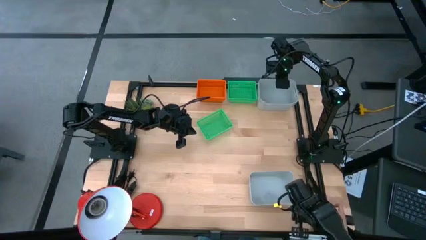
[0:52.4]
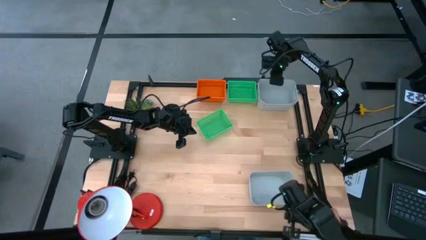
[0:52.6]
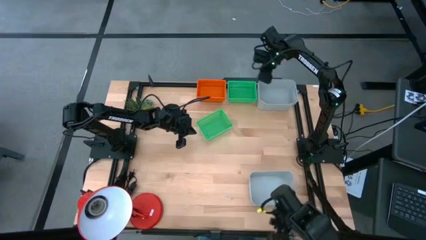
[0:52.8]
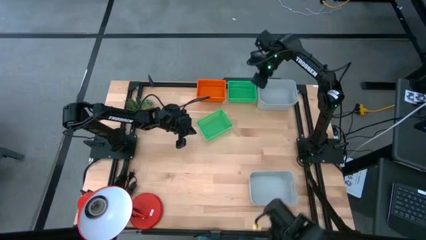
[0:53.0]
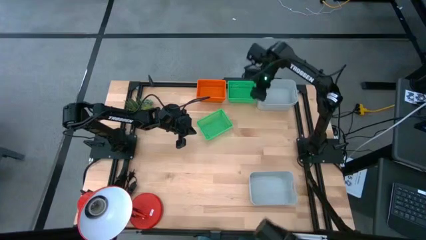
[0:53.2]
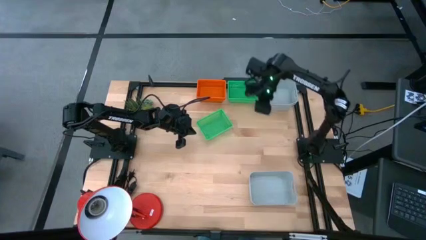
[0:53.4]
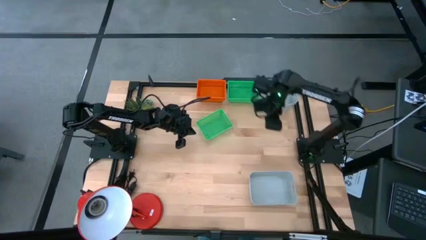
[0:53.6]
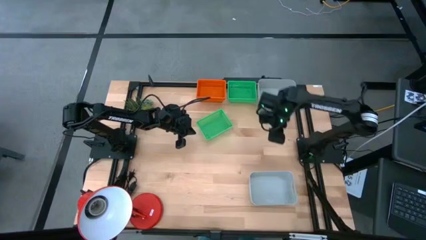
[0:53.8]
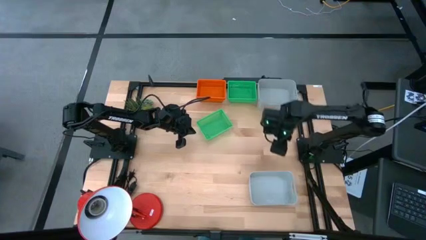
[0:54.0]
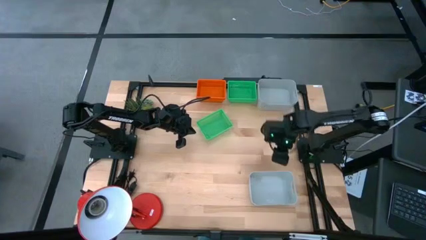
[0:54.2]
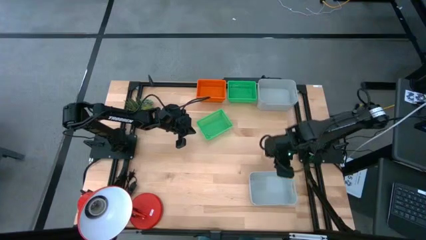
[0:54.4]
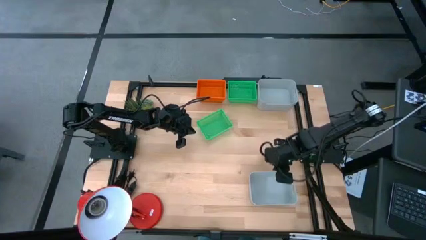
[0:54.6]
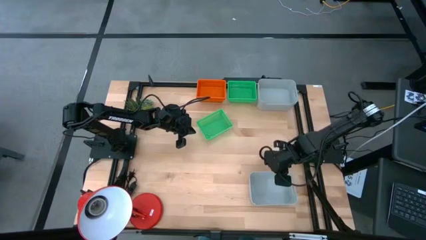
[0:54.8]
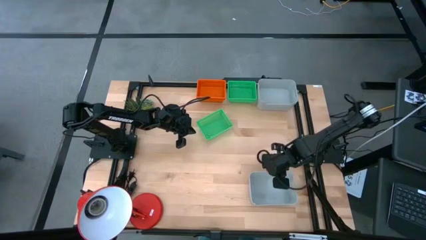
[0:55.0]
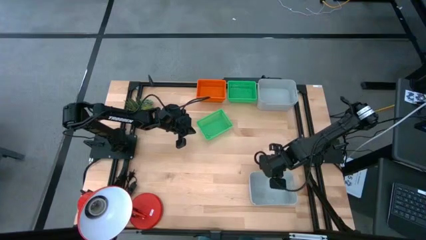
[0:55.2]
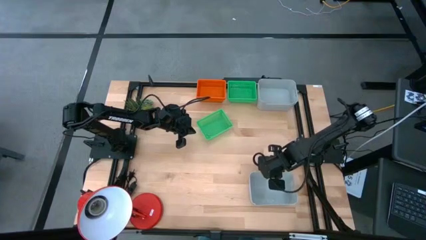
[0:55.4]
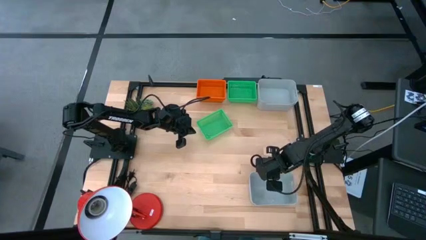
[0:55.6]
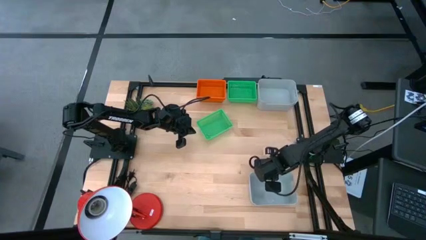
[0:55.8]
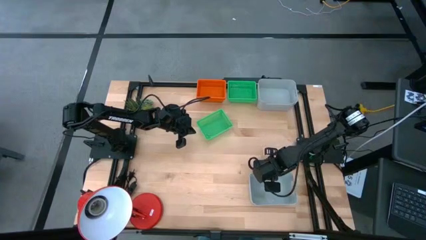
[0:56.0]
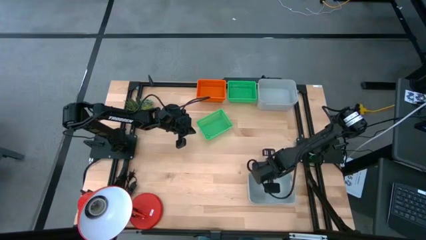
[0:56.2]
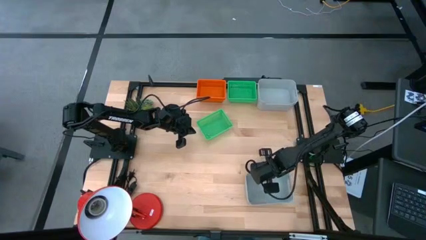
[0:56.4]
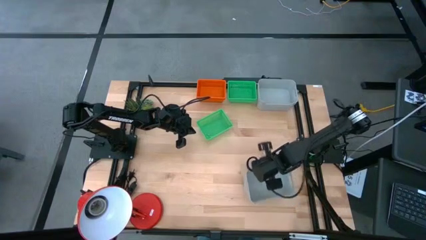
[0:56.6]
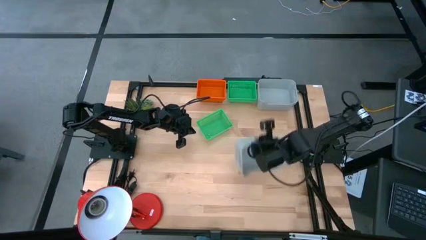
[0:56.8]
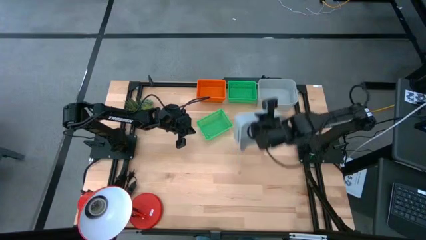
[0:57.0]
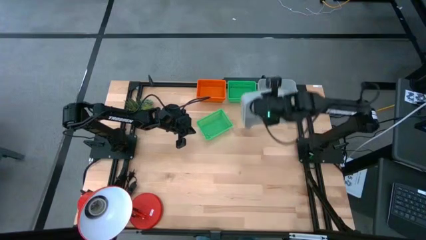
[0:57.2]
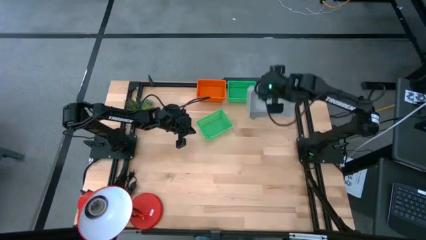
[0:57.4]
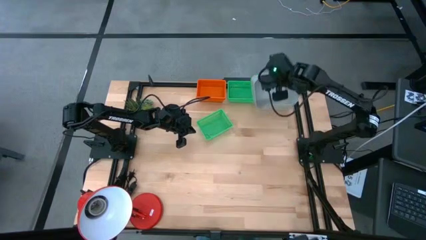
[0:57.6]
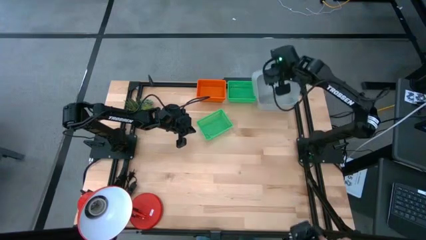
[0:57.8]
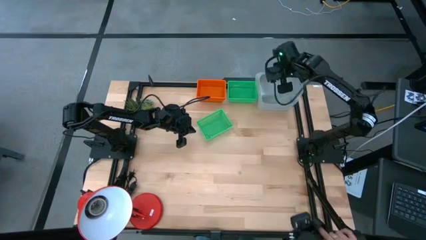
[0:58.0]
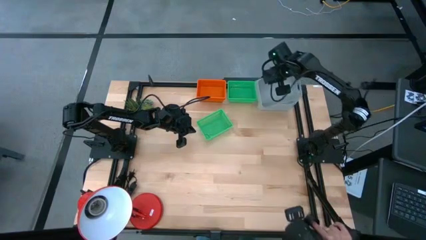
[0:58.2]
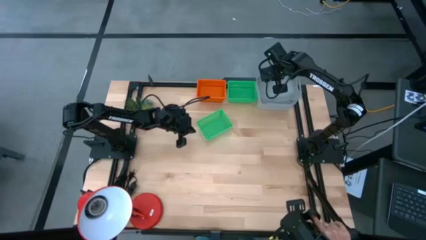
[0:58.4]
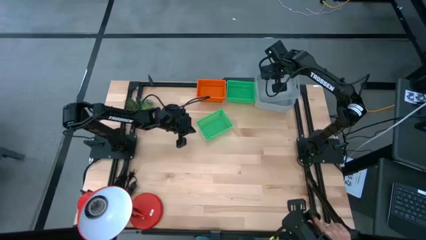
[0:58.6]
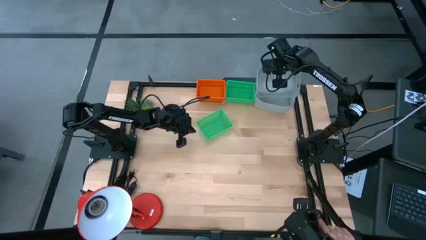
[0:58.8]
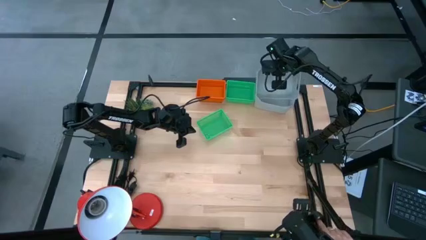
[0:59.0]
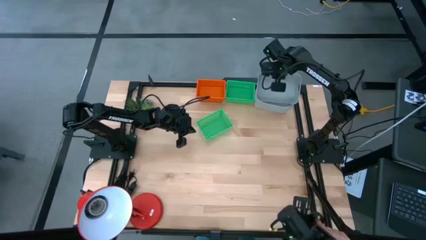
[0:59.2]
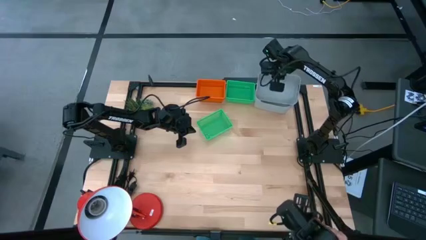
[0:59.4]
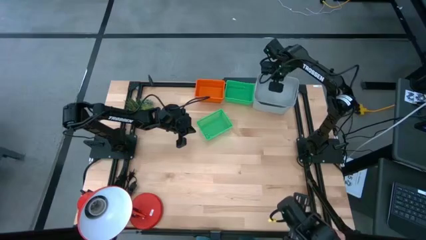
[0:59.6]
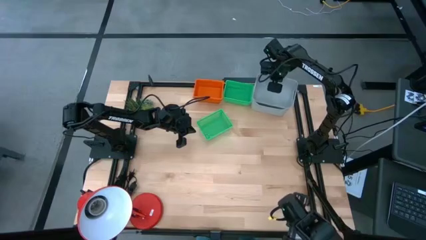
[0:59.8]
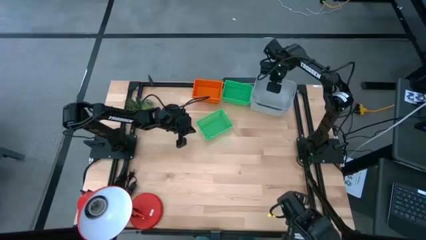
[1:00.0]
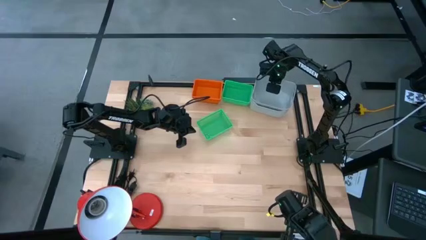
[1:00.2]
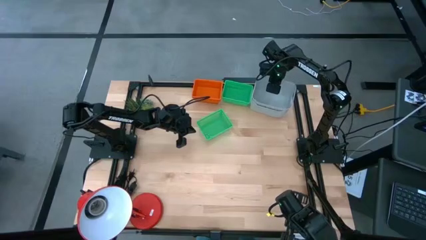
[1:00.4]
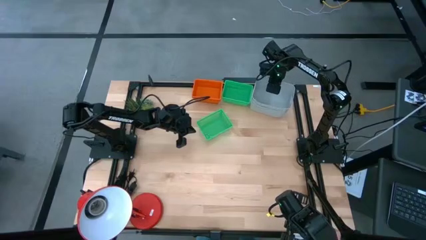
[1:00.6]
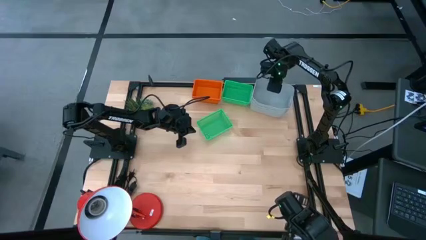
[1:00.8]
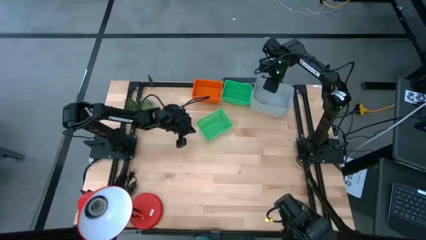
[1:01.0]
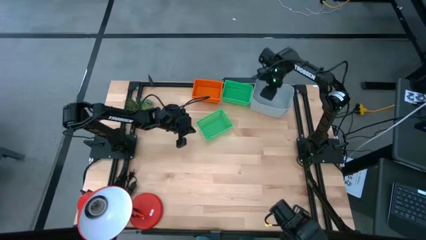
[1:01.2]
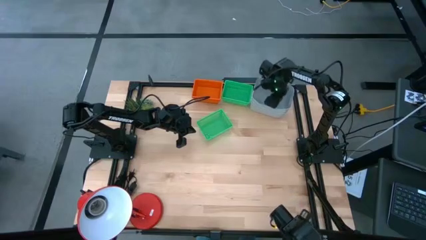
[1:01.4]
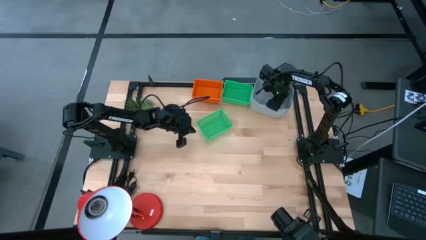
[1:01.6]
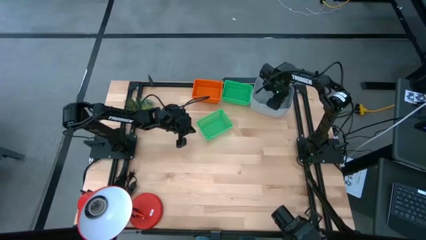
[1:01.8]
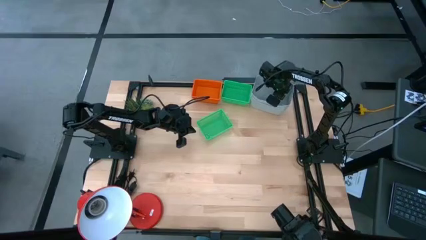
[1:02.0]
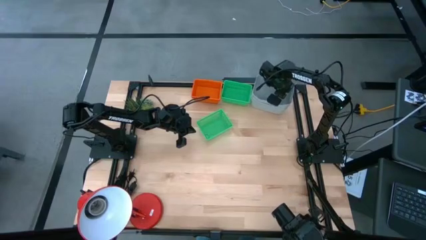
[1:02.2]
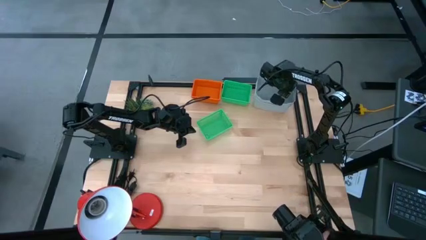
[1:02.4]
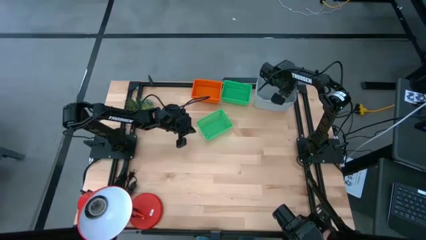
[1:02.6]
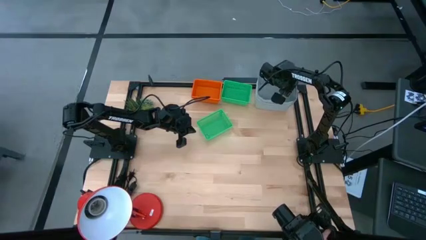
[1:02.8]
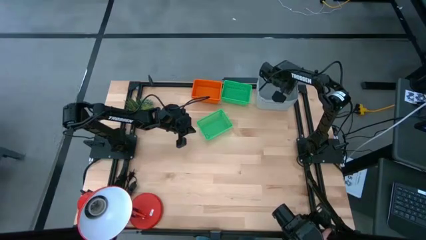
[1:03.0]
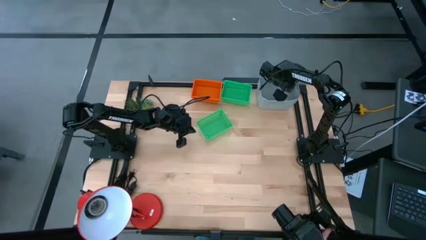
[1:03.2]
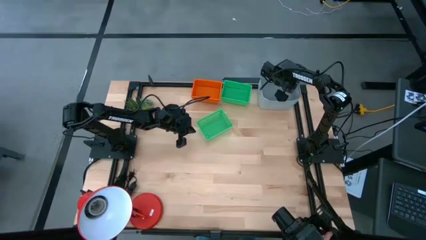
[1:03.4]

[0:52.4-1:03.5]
Stack the gray bin on the stacked gray bin

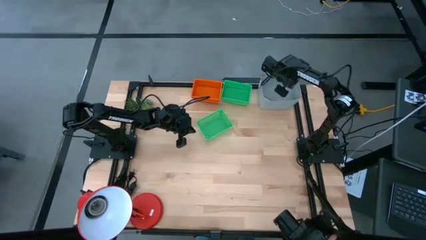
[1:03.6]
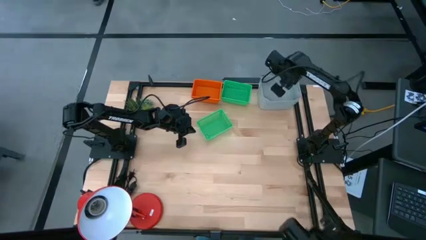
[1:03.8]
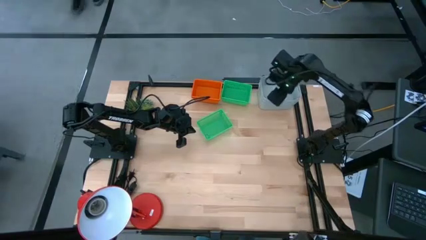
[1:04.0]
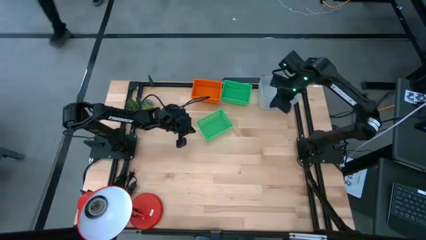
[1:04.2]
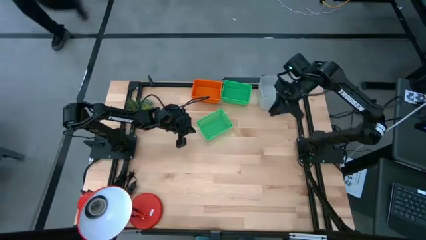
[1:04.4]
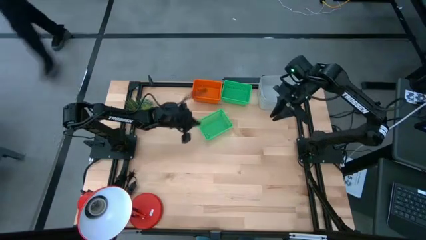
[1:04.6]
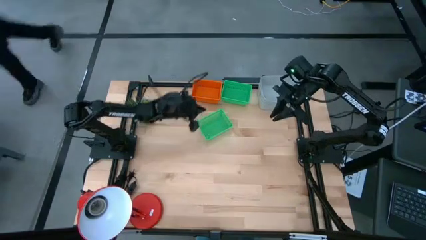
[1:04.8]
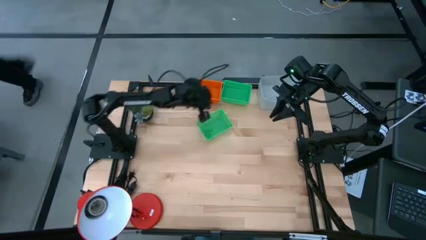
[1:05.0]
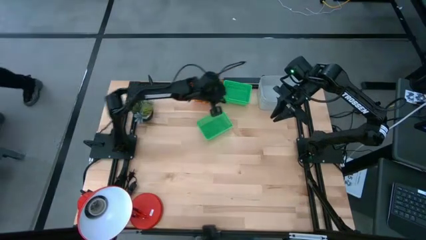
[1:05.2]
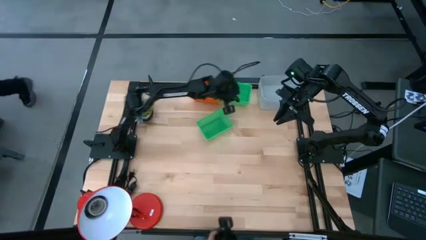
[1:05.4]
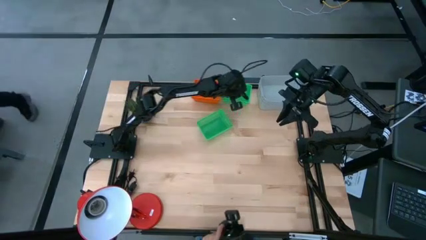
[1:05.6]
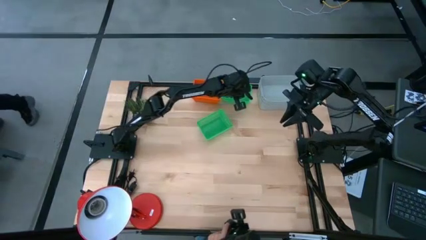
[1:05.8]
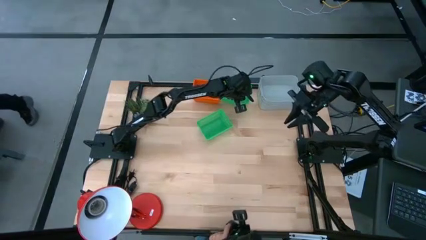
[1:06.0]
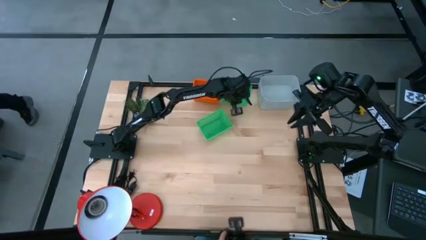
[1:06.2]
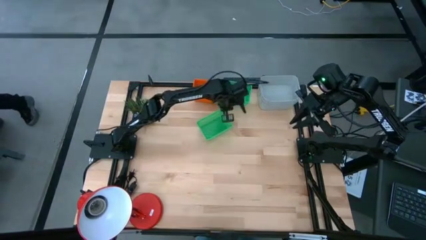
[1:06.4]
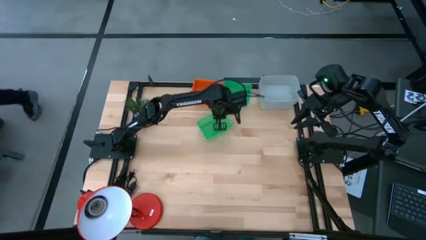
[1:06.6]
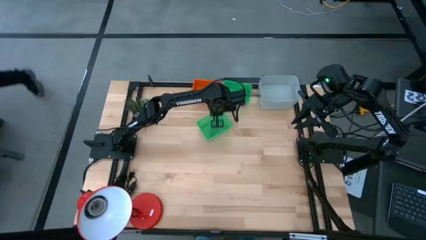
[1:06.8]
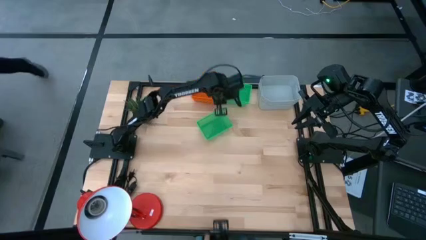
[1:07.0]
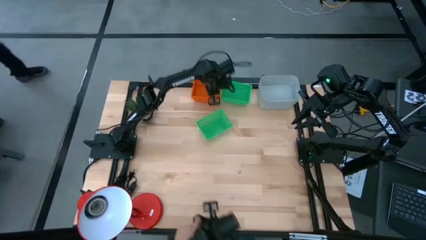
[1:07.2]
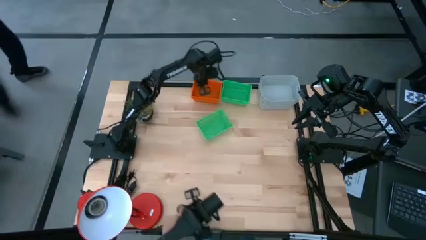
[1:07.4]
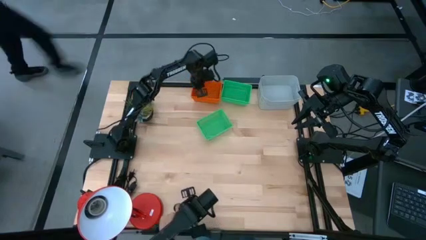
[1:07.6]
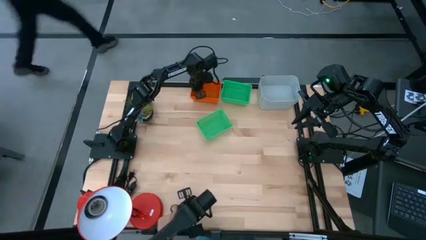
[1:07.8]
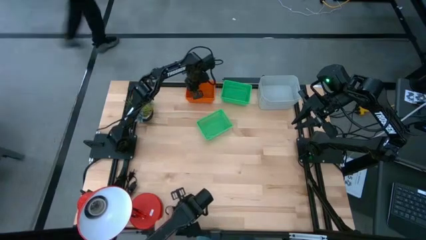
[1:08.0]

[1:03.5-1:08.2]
Adjust the orange bin

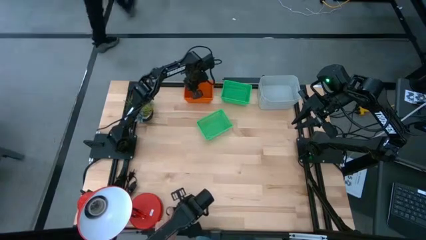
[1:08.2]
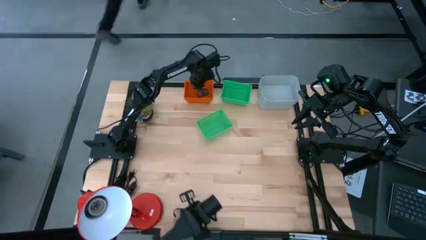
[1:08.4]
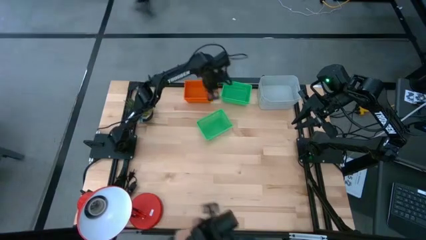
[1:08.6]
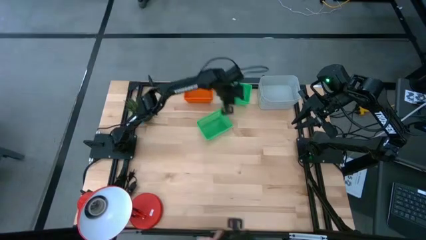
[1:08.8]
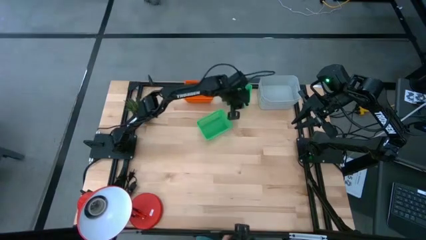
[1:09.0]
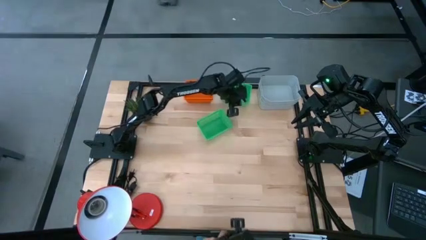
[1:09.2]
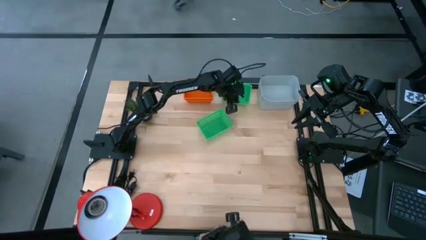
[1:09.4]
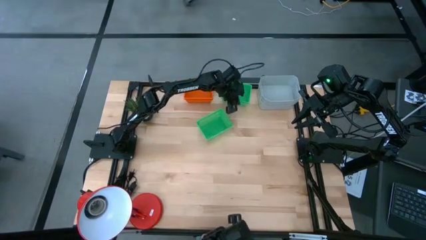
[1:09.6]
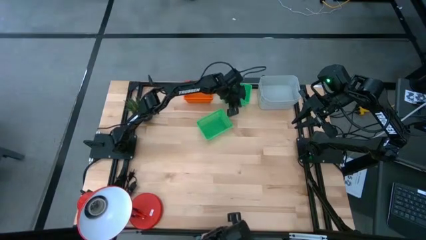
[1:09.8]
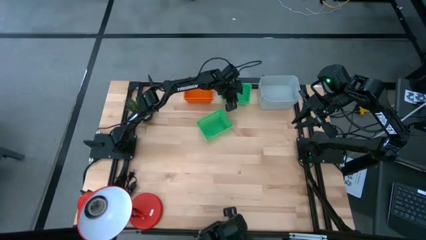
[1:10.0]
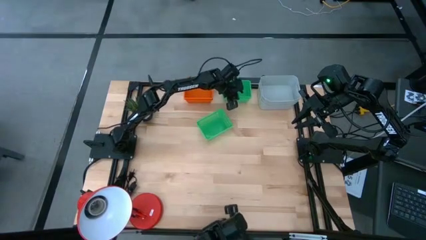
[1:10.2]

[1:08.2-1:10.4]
Adjust the stacked green bins
